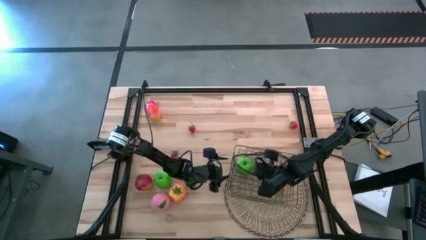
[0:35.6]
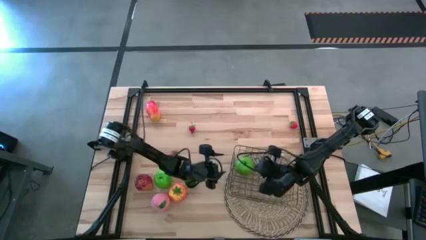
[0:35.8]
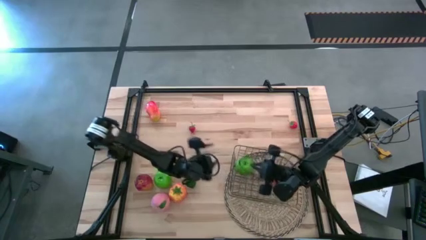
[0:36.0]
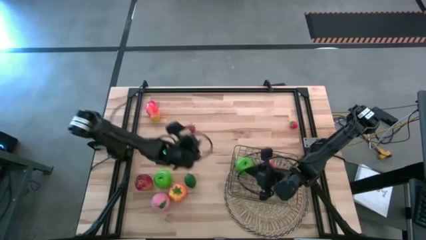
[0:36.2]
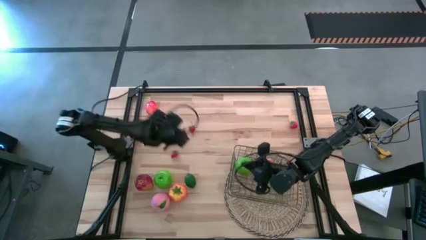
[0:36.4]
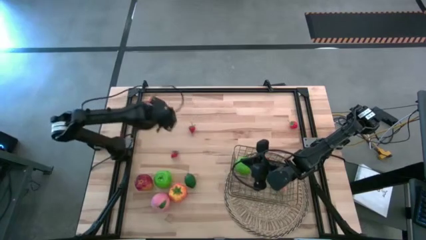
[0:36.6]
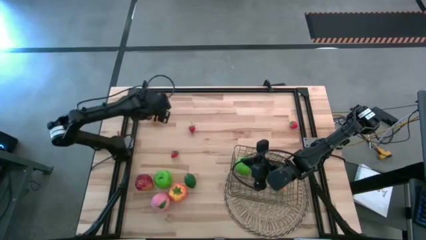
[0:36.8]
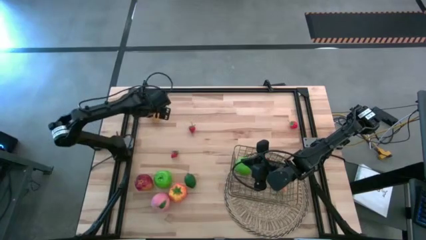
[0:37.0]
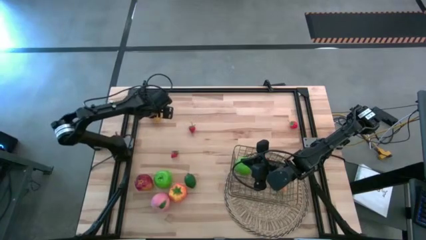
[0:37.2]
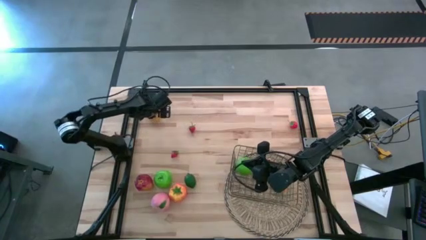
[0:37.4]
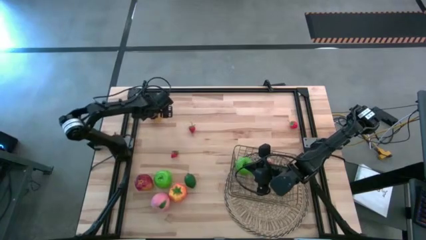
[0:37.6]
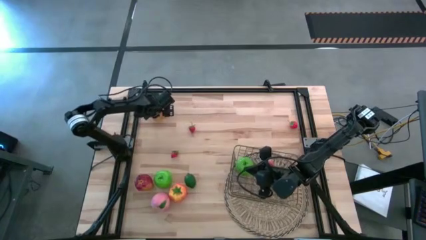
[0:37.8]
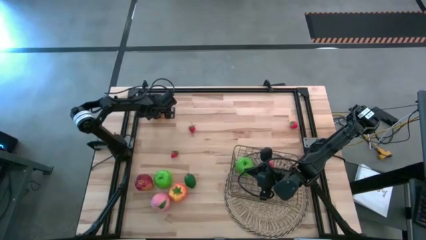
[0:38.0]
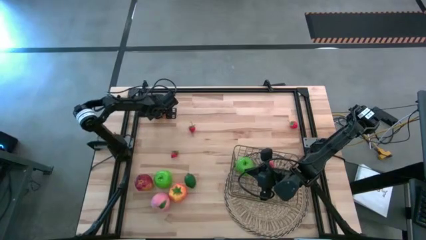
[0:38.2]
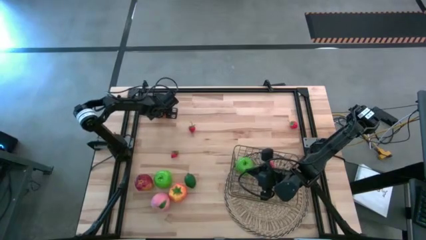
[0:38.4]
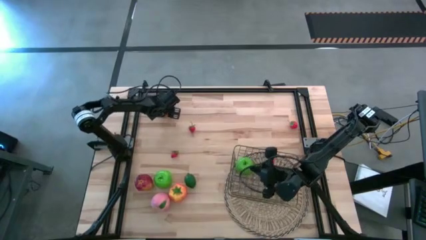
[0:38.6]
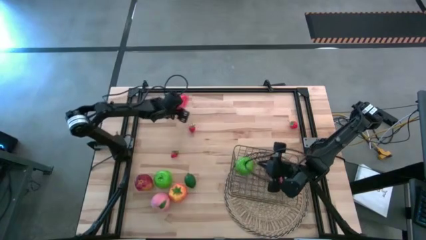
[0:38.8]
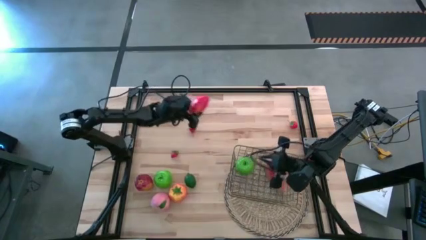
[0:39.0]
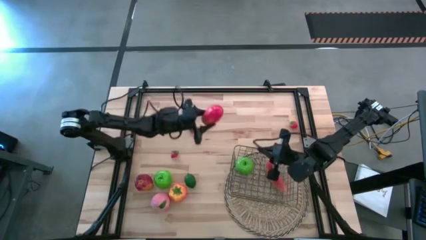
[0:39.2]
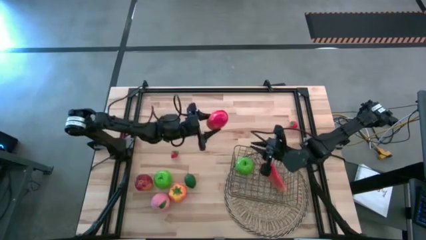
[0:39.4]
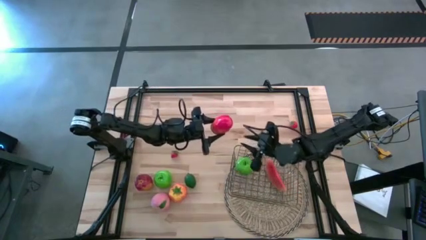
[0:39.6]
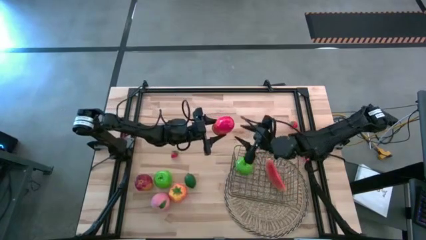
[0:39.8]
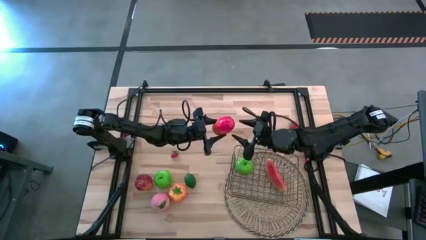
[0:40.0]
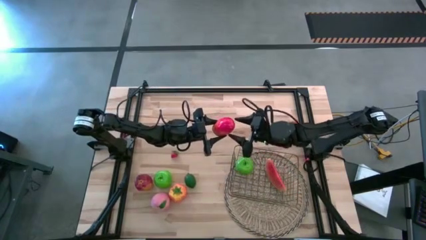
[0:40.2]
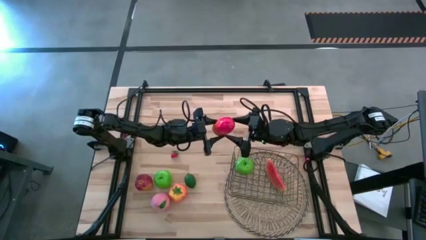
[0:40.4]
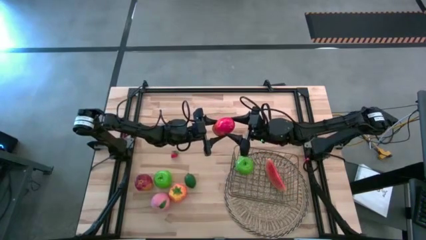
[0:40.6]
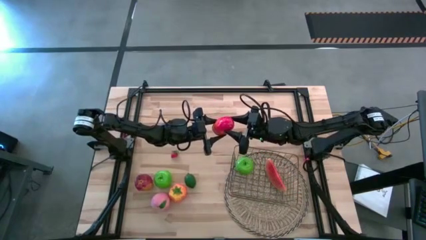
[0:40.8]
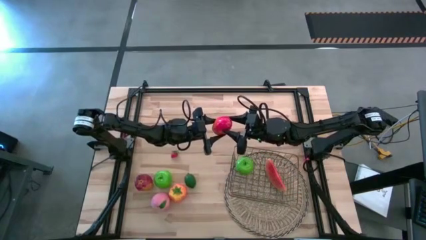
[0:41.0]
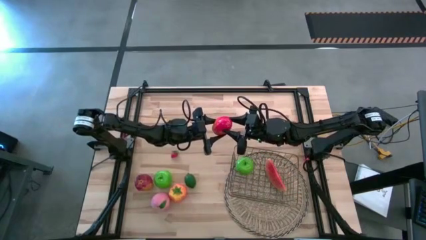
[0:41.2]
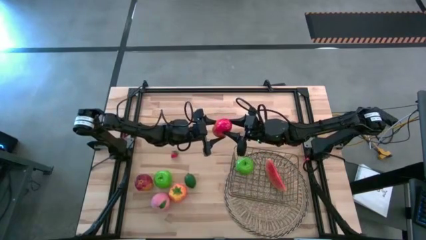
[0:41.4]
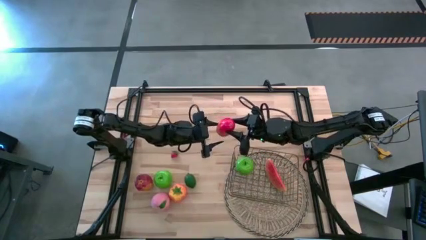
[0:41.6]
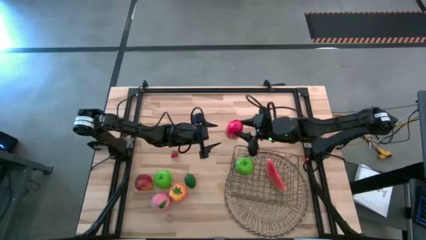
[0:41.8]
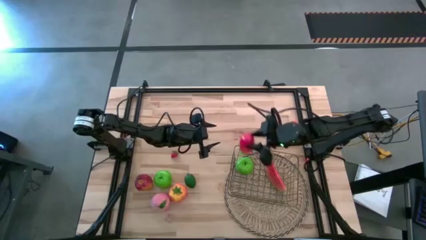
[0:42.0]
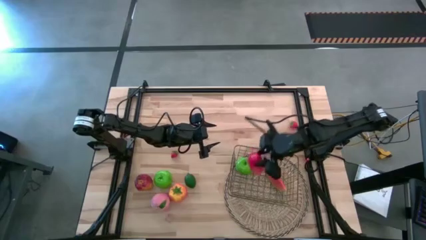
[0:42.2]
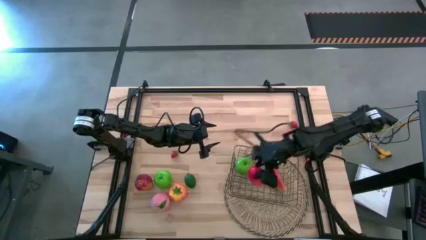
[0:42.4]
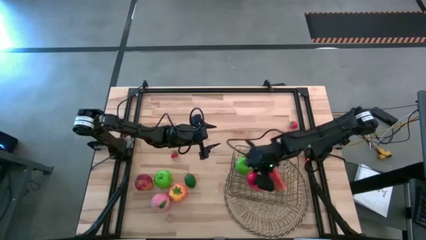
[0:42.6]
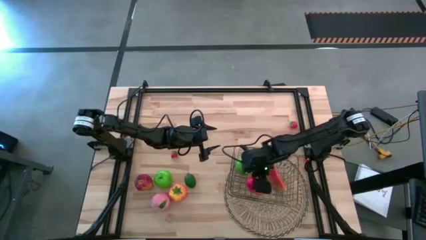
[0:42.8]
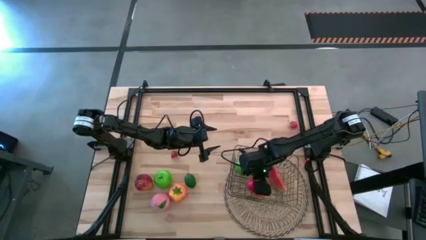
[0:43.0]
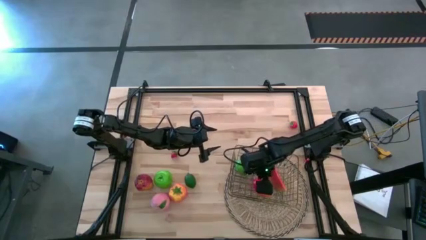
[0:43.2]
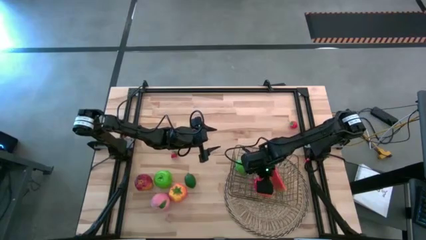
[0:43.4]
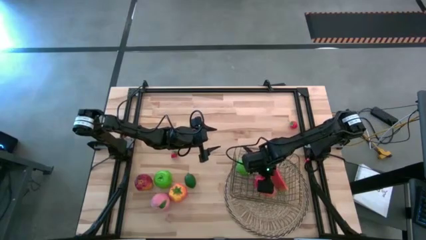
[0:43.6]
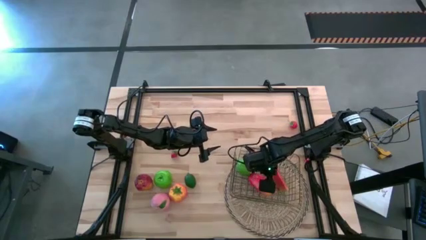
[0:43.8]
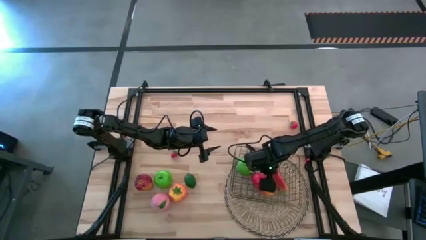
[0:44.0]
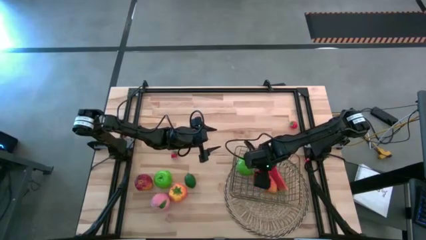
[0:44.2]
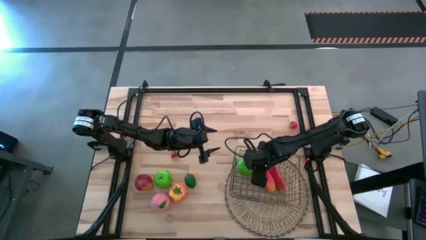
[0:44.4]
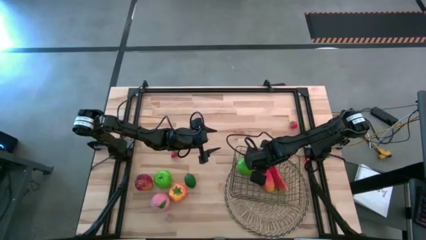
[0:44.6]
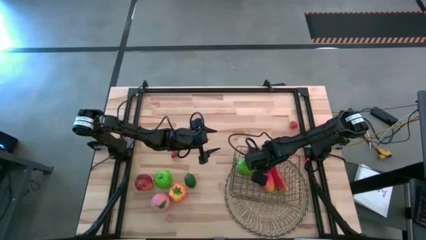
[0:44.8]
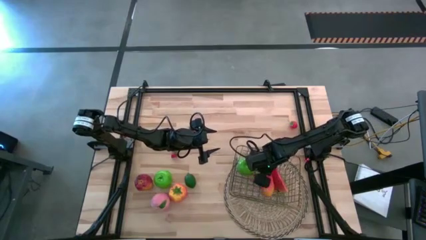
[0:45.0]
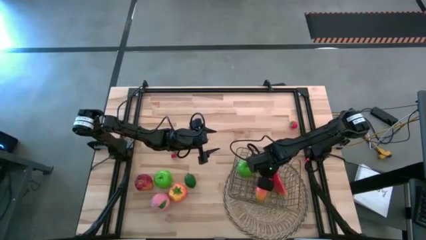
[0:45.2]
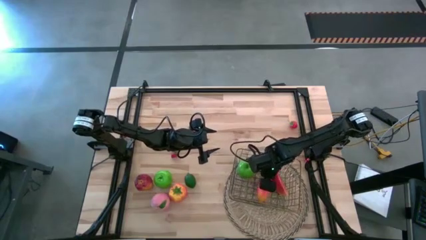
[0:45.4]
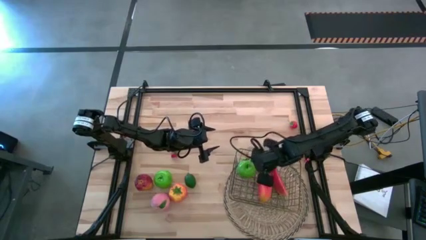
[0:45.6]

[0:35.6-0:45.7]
Task: Build produce basket
Put the mango into the wire basket

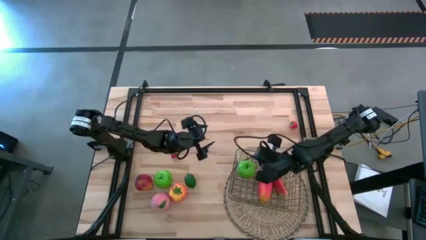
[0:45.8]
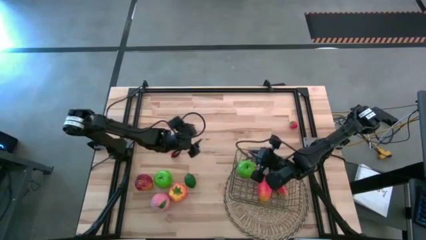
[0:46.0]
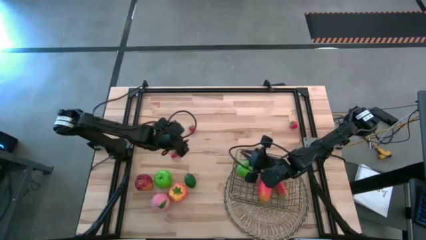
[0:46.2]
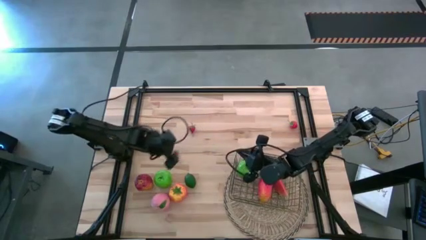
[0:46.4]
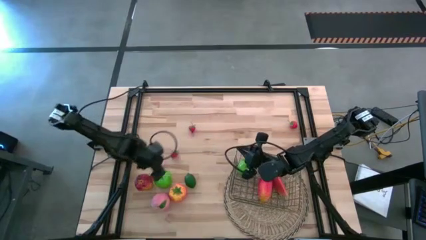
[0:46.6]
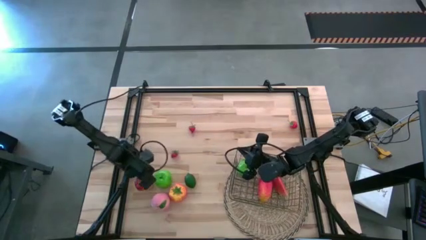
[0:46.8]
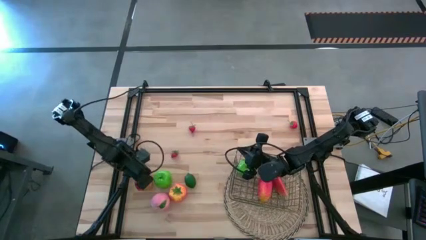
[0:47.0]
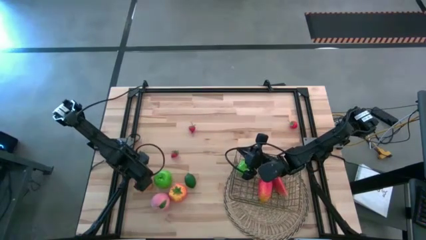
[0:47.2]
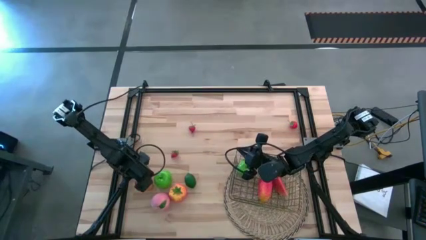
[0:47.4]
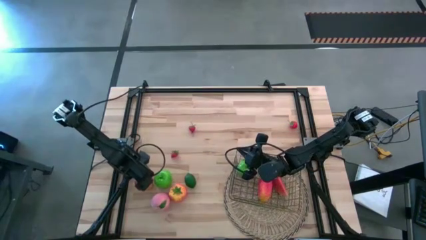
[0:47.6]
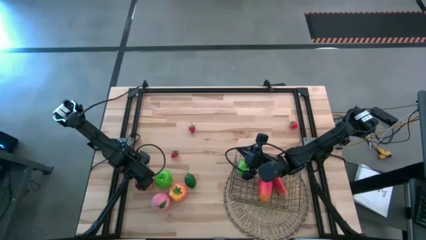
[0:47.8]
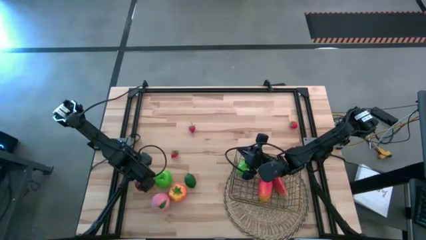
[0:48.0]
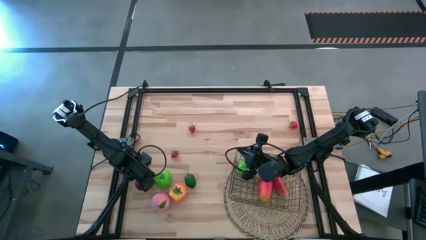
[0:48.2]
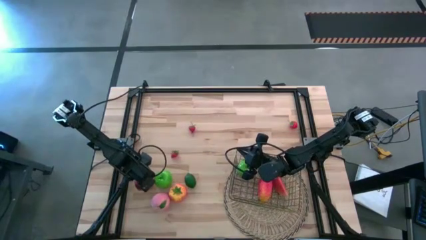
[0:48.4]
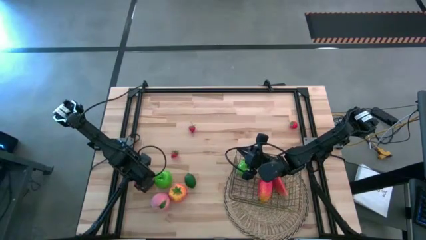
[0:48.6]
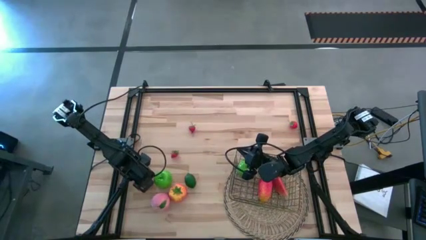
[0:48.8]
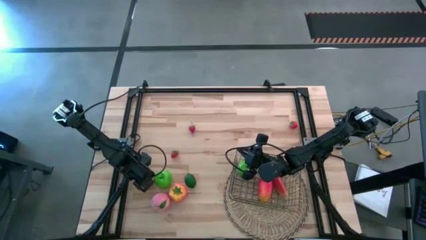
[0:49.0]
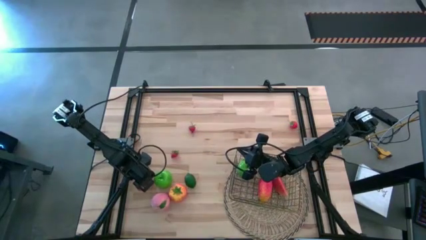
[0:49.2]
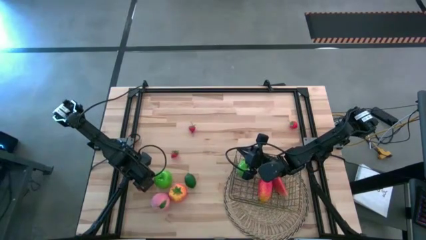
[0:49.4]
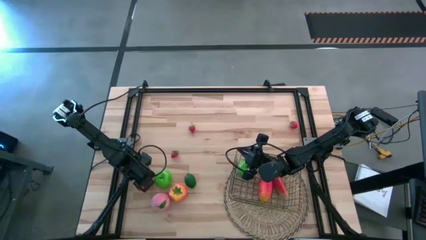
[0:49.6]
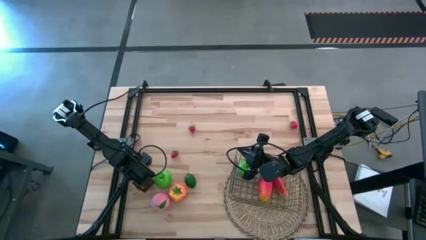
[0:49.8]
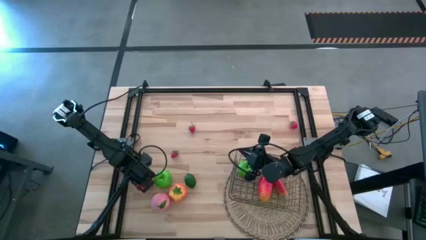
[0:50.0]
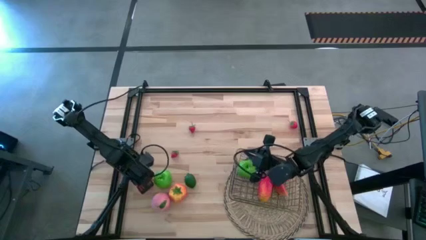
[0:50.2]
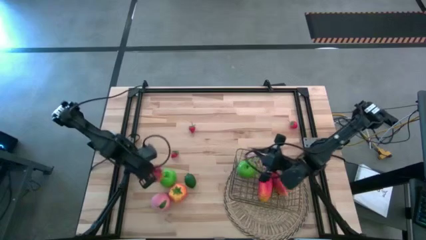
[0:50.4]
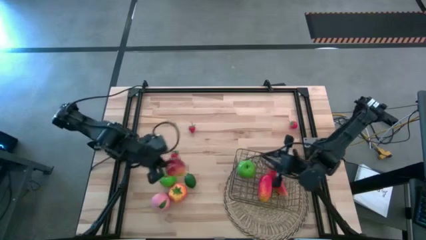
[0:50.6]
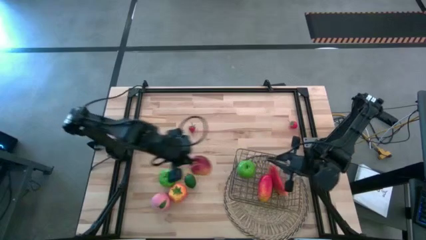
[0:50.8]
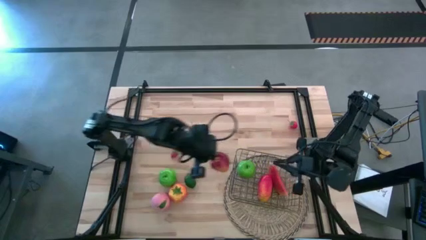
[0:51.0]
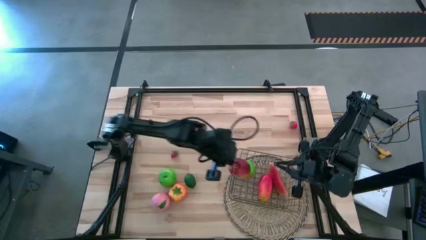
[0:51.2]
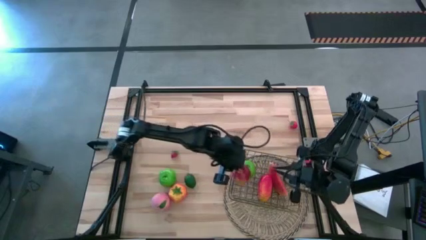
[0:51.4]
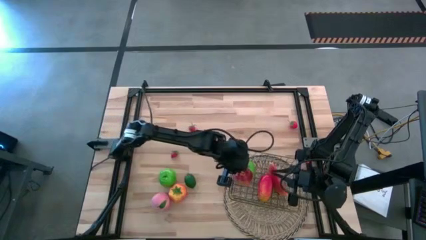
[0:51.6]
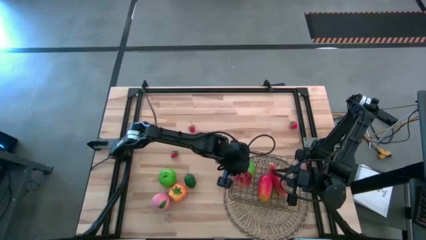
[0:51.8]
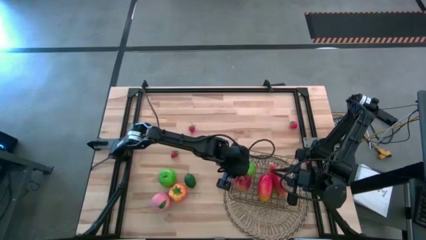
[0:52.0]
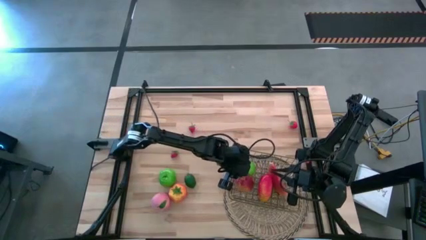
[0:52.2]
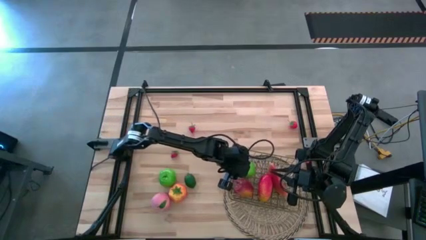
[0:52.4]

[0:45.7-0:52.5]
Put the red apple into the wire basket
